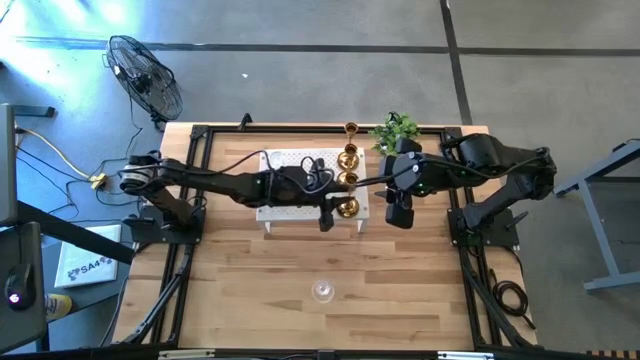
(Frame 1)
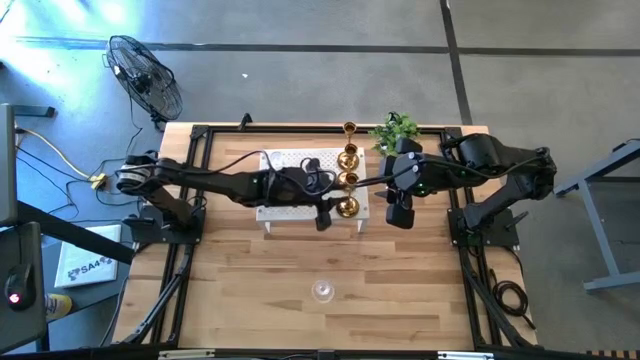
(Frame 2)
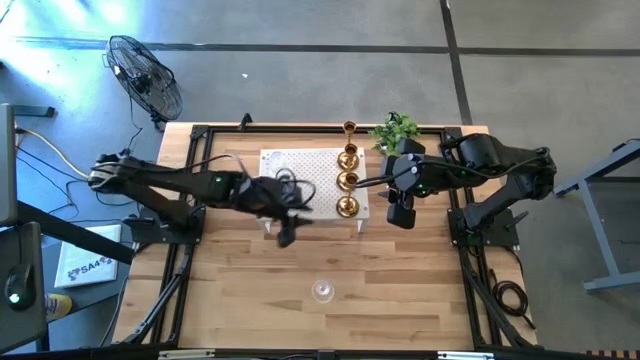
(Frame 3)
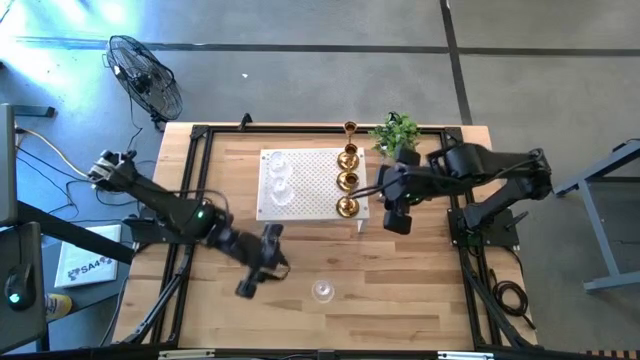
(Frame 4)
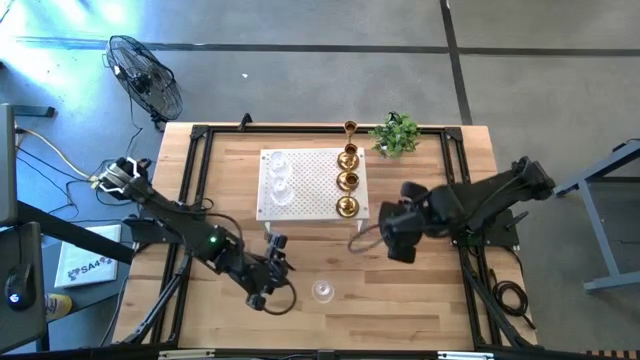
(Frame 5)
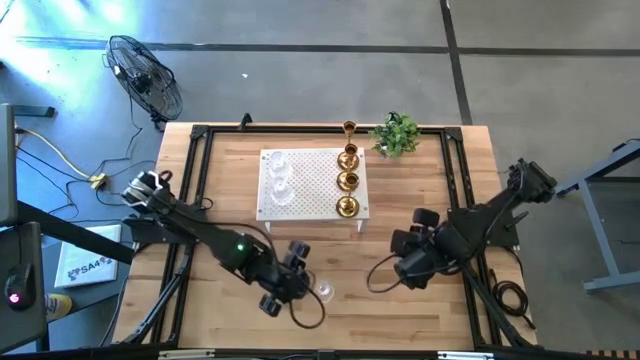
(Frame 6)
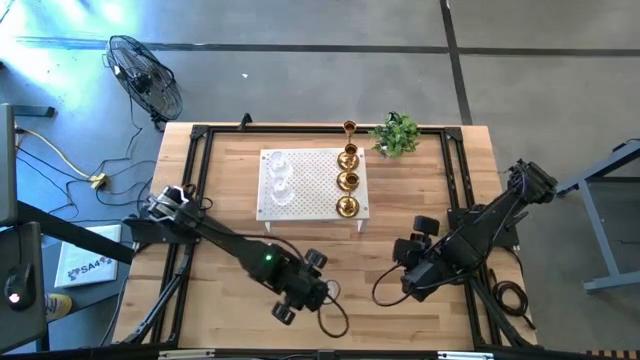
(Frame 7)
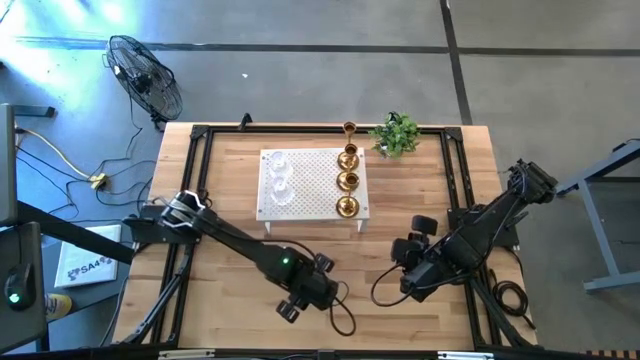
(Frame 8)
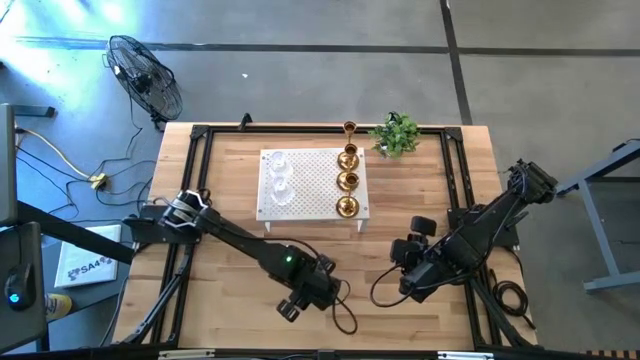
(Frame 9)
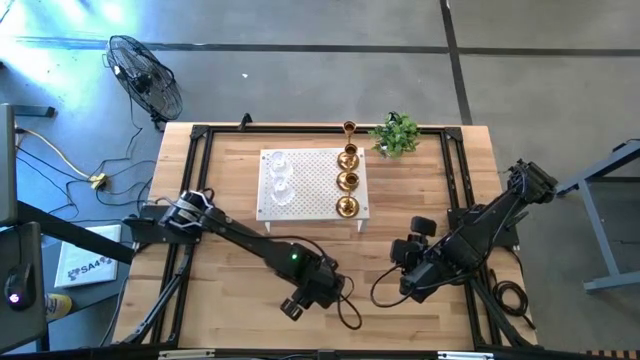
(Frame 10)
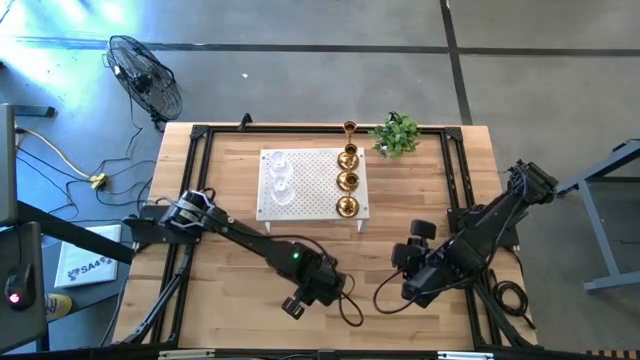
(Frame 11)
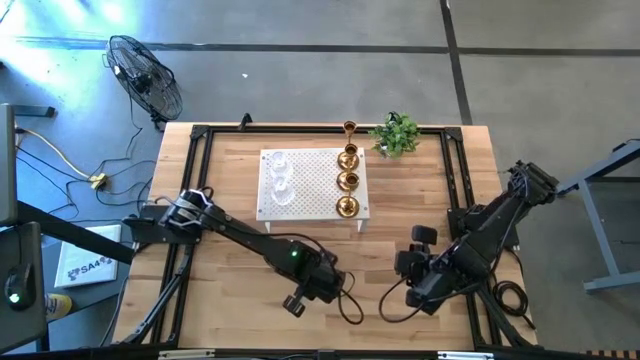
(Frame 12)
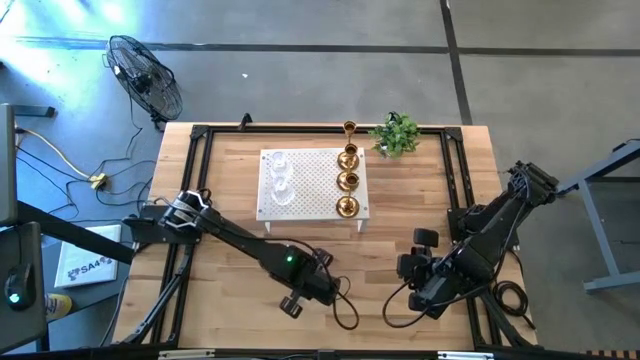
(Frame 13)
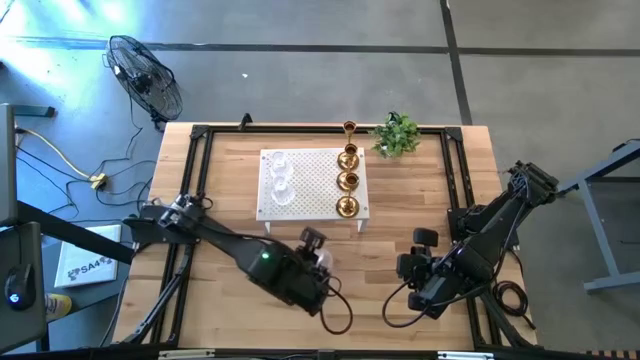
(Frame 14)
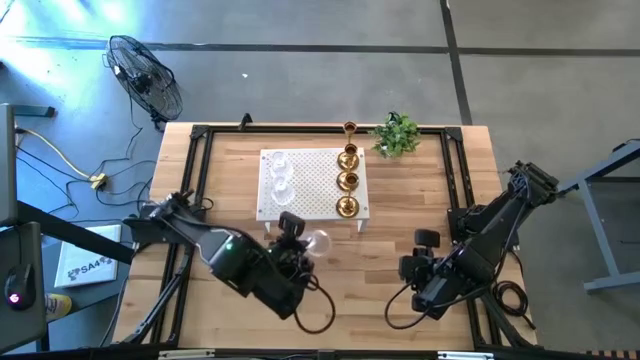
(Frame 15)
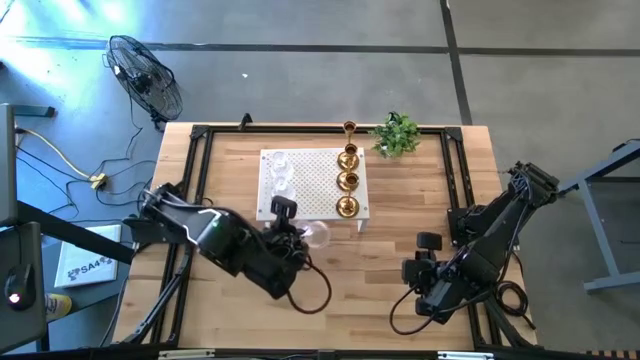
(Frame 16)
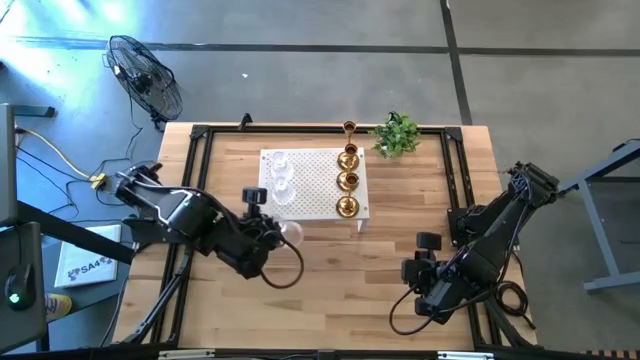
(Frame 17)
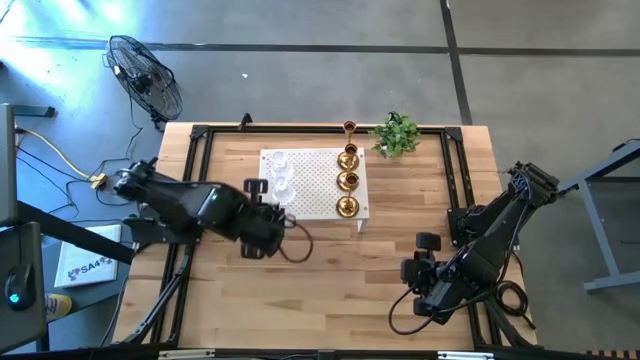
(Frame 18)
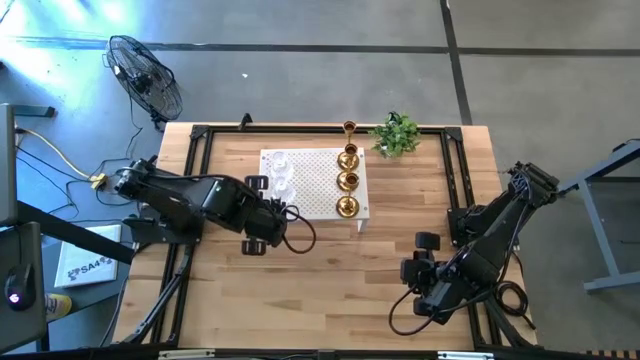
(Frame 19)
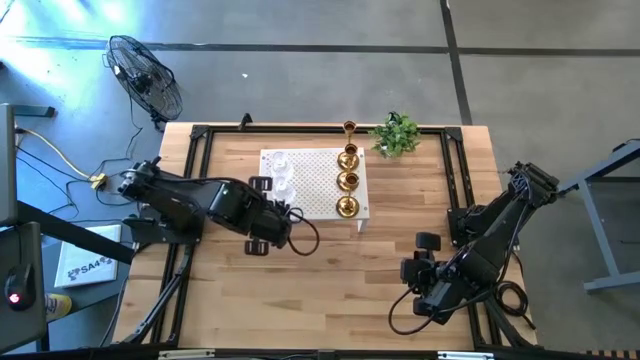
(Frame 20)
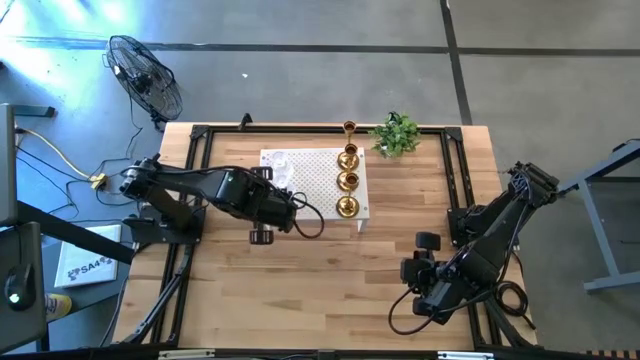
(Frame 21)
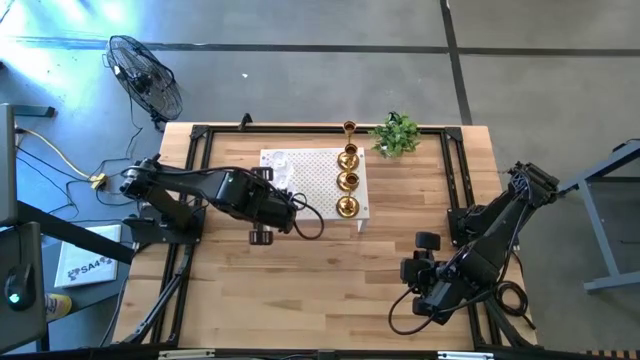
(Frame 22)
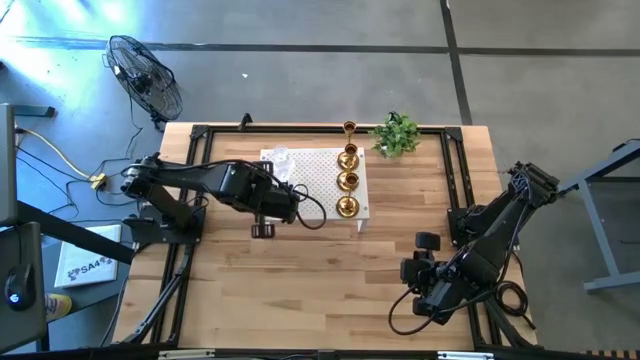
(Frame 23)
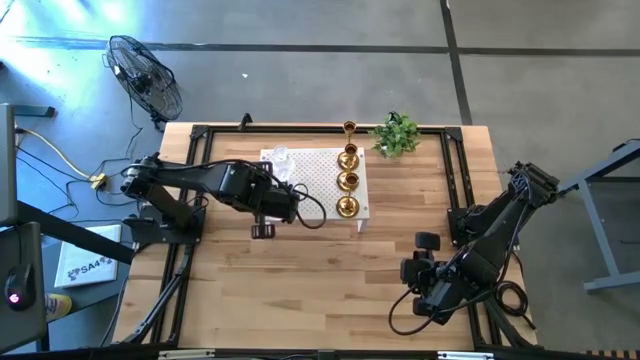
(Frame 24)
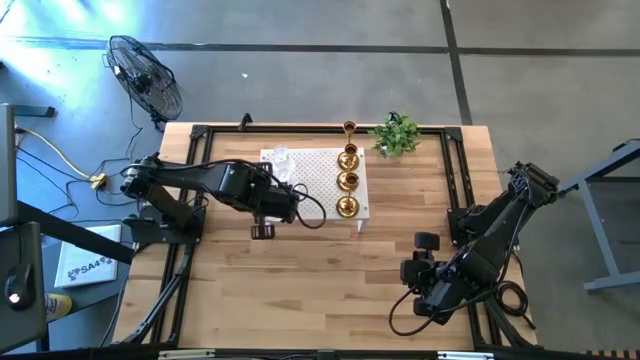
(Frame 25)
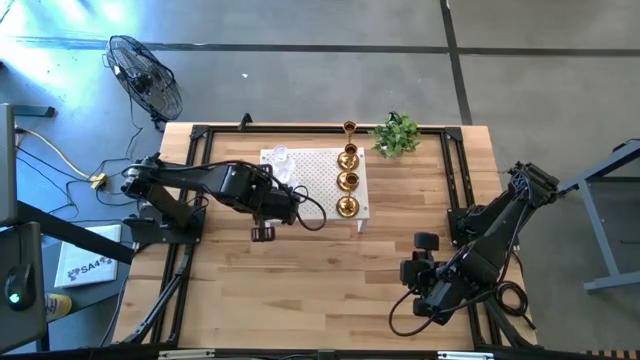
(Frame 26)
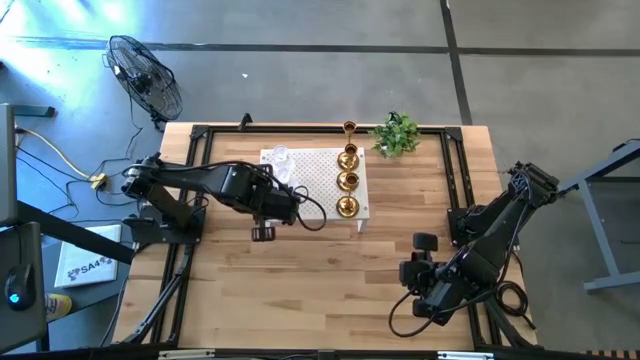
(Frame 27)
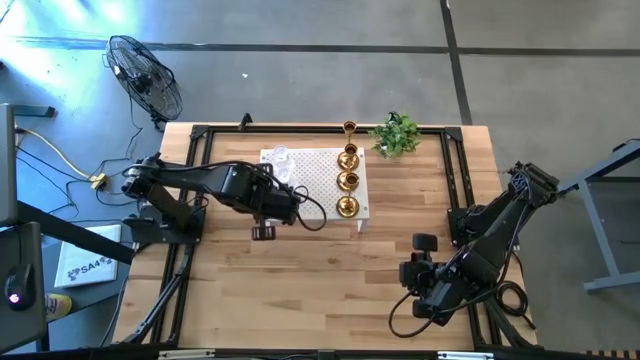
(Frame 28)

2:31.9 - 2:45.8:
Task: Pick & Place candle stick holders
Put the transparent glass candle holder on the shelf aligned with the other transparent glass candle holder

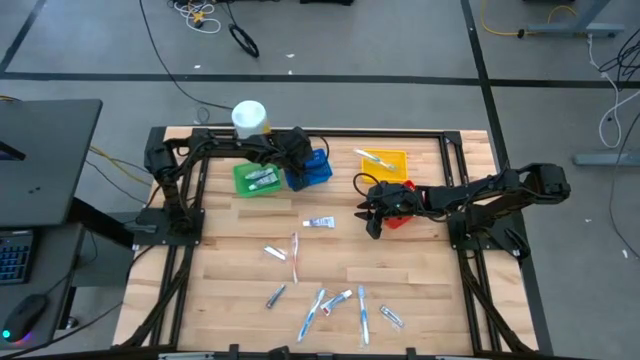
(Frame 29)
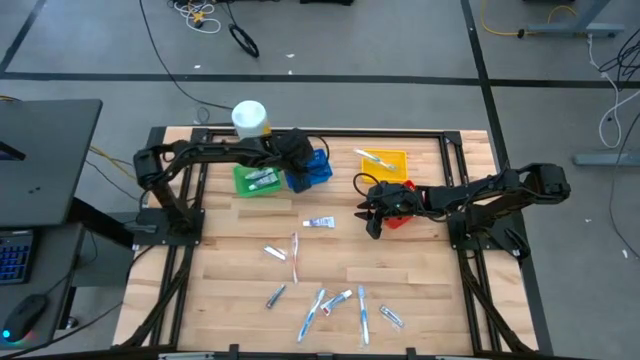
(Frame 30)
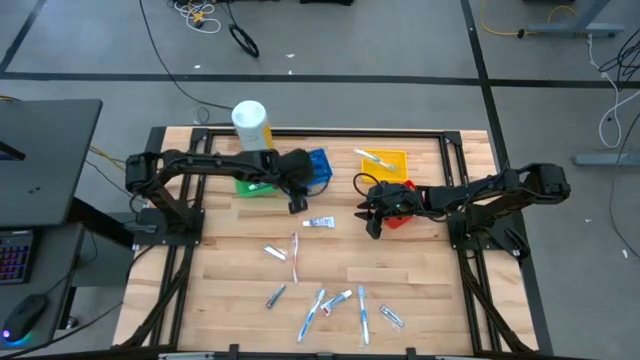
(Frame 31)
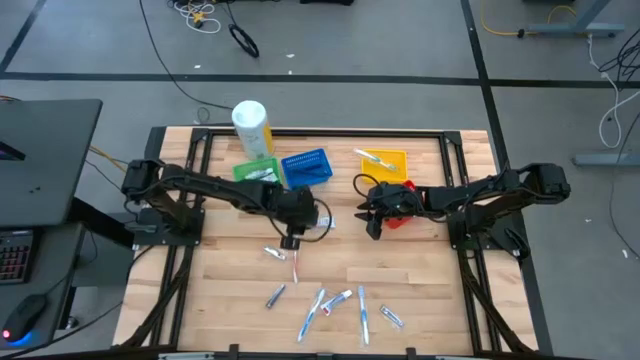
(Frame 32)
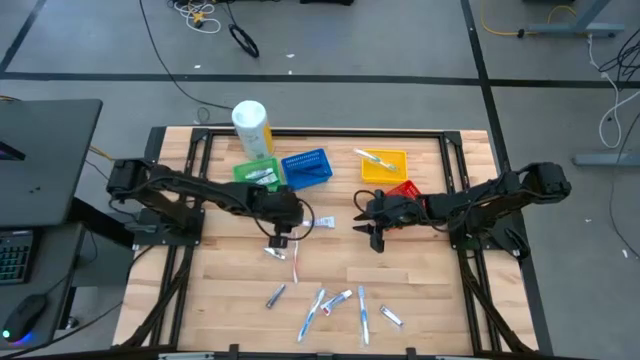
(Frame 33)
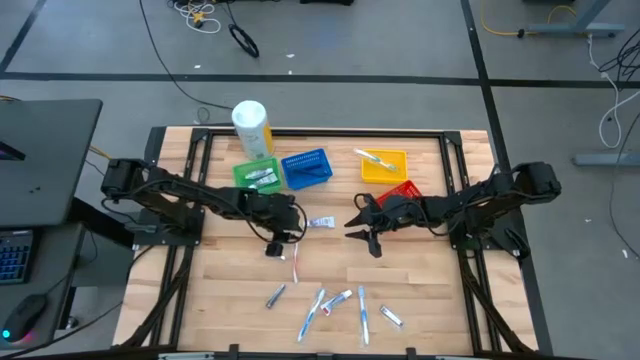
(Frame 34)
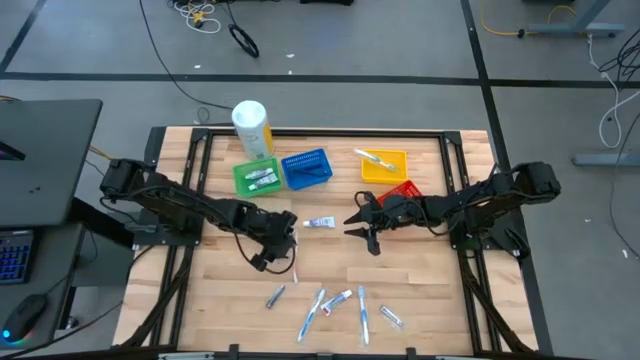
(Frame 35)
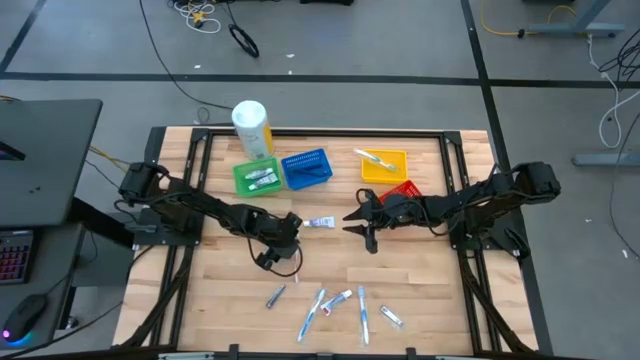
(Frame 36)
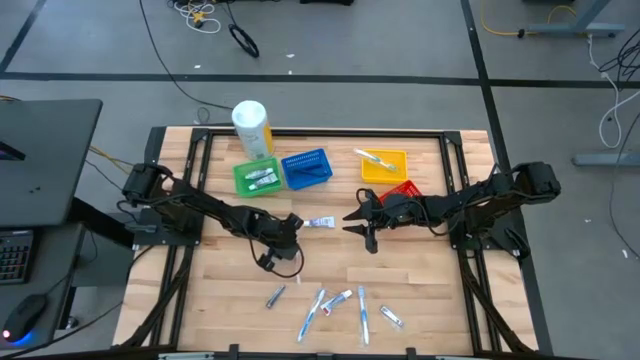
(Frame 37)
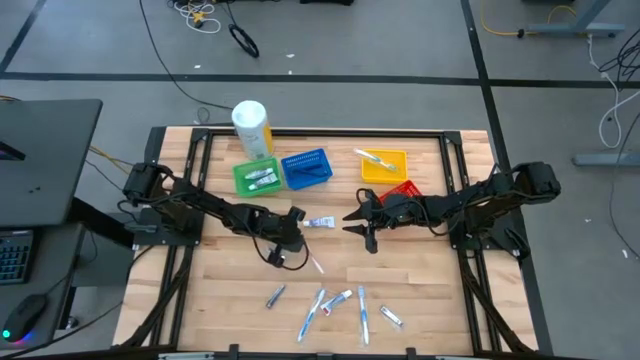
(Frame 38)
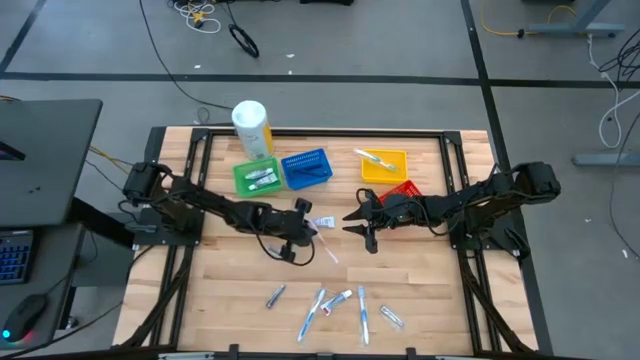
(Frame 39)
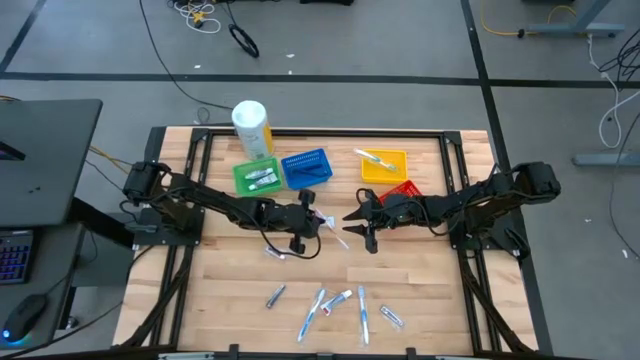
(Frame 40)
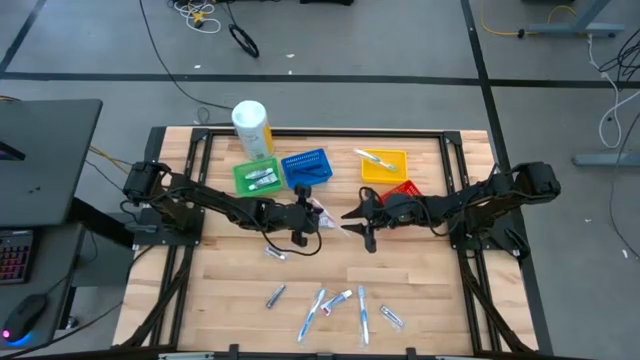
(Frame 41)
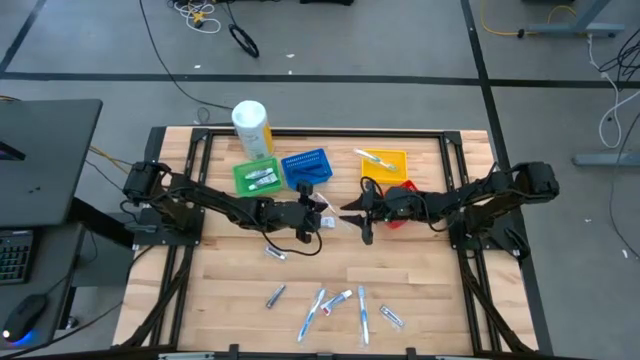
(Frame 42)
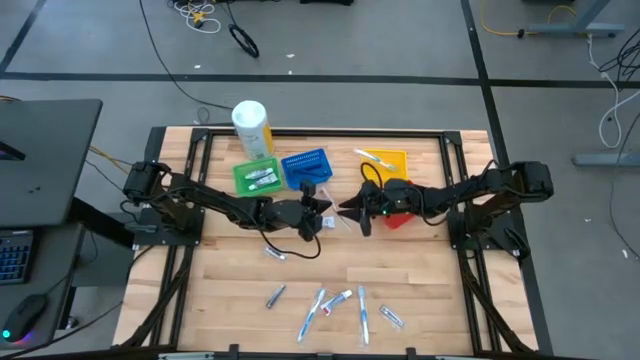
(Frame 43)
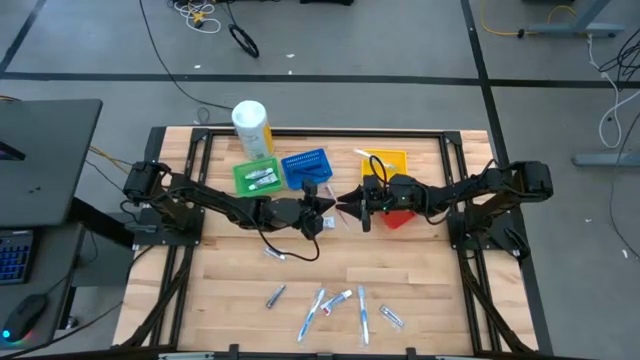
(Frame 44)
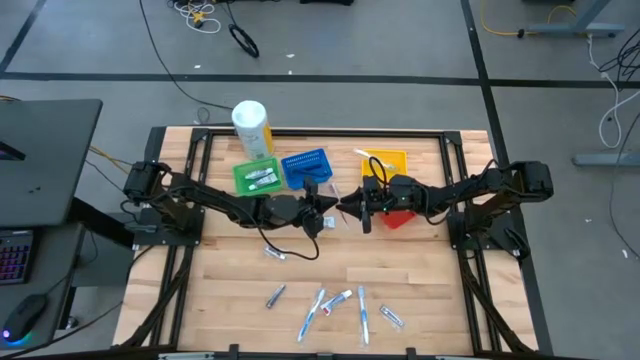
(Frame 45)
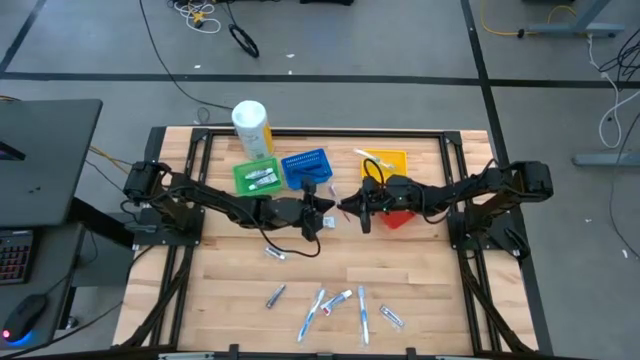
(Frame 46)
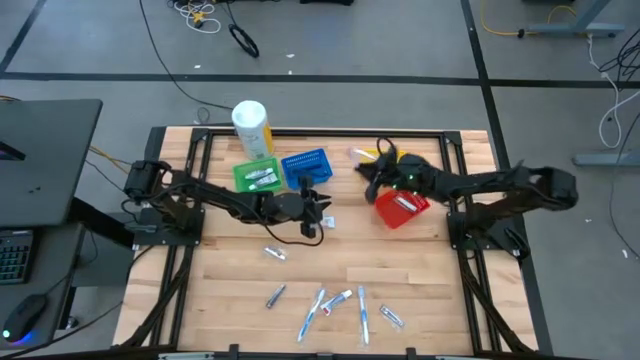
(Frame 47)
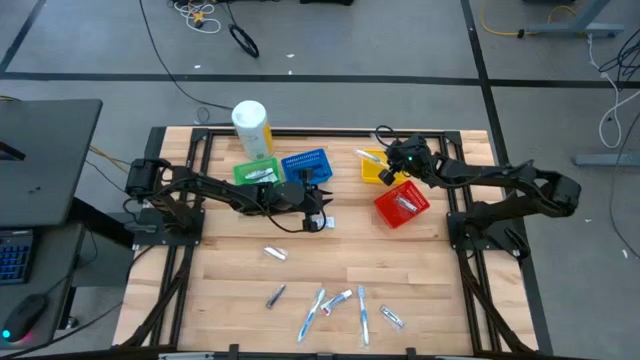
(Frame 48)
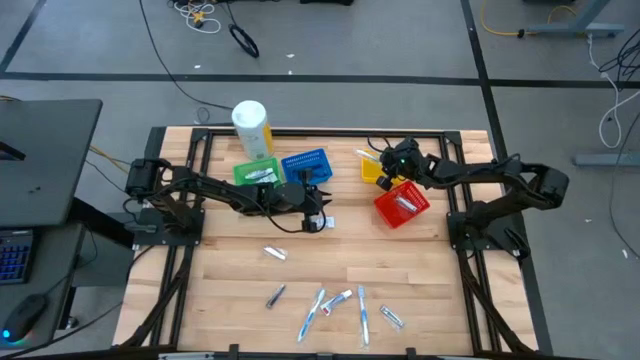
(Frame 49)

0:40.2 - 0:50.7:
Task: Pick & Place Travel size toiletries
Put the orange toothbrush into the yellow bin
